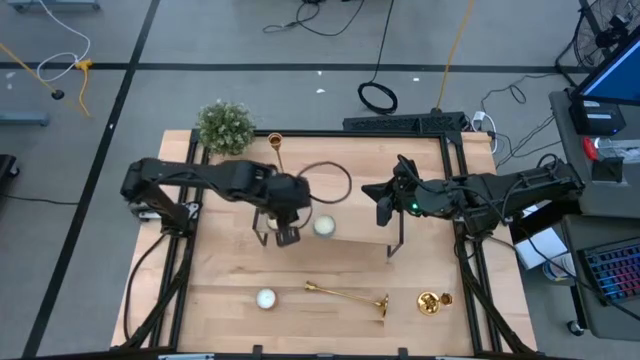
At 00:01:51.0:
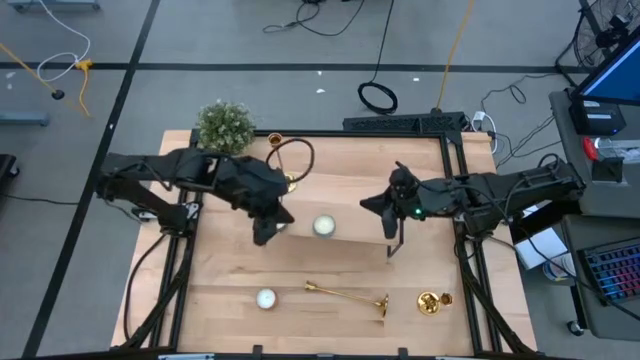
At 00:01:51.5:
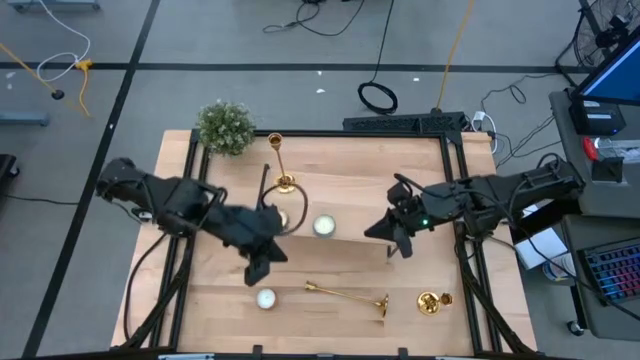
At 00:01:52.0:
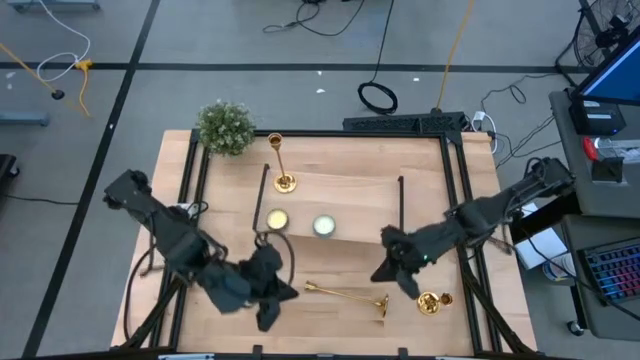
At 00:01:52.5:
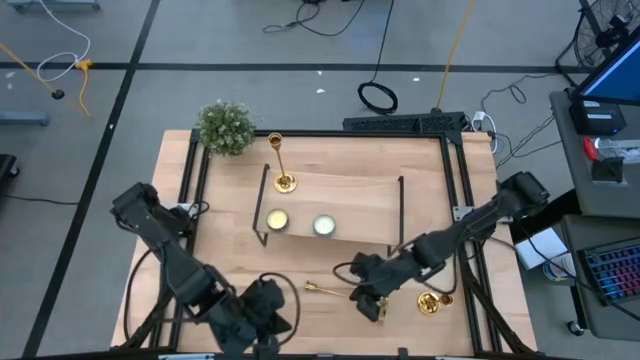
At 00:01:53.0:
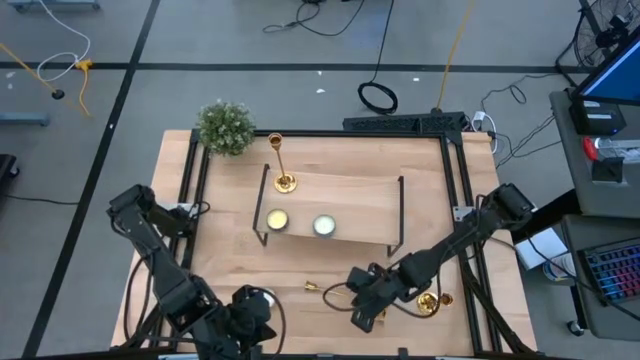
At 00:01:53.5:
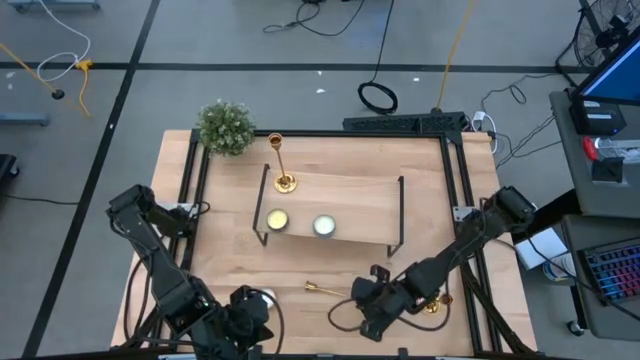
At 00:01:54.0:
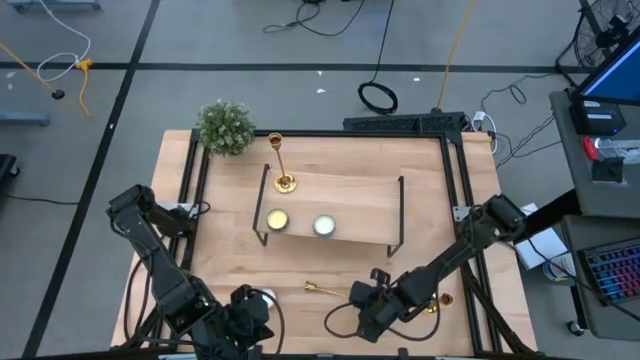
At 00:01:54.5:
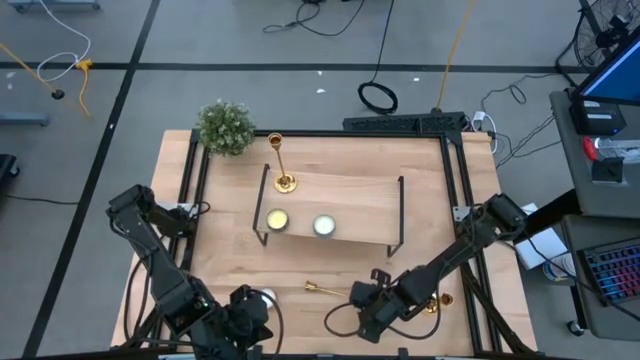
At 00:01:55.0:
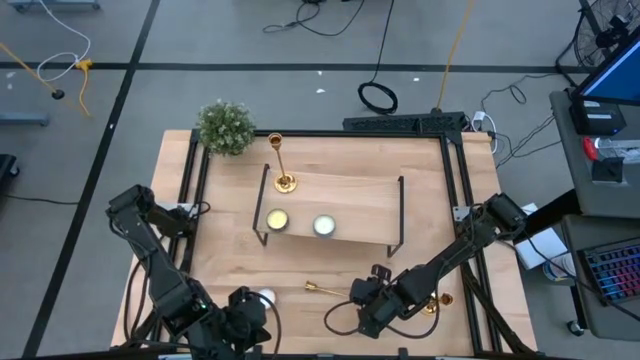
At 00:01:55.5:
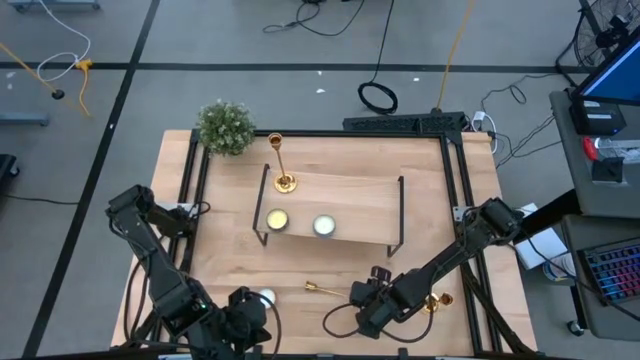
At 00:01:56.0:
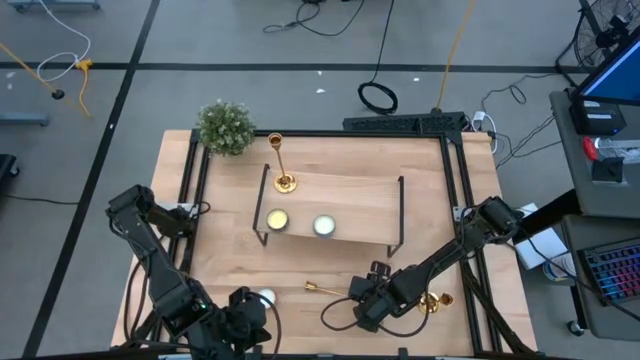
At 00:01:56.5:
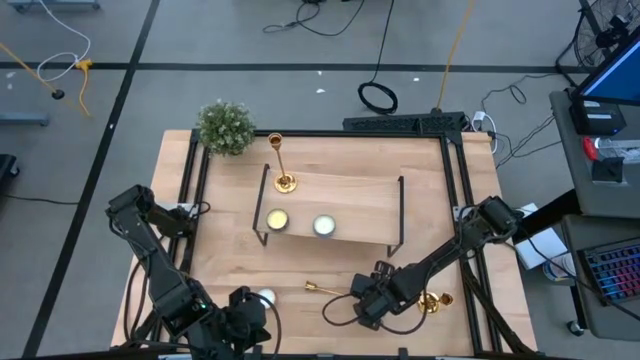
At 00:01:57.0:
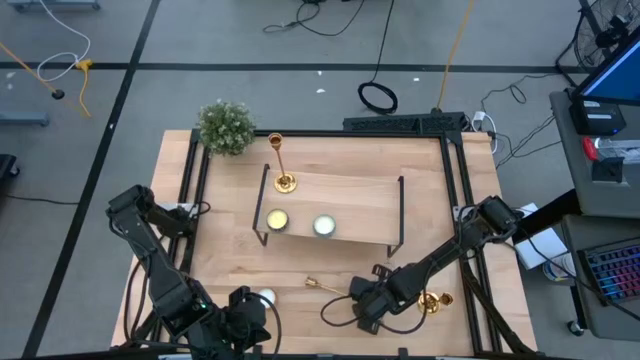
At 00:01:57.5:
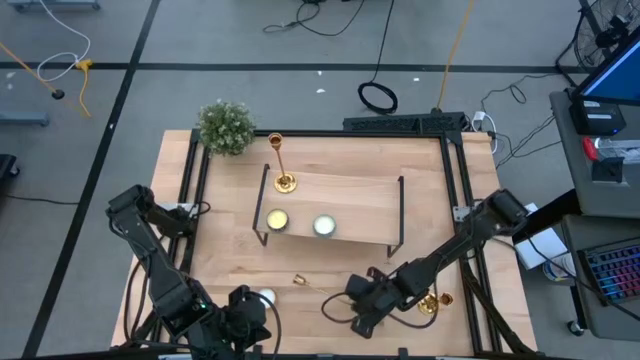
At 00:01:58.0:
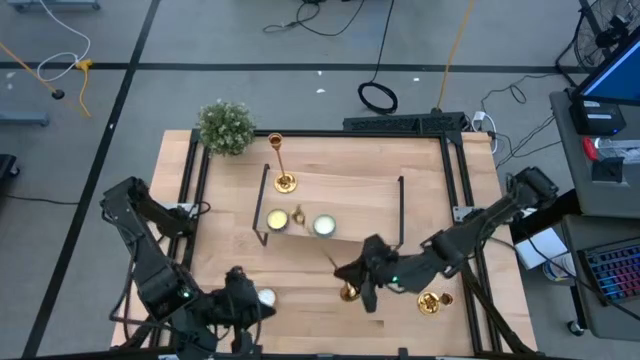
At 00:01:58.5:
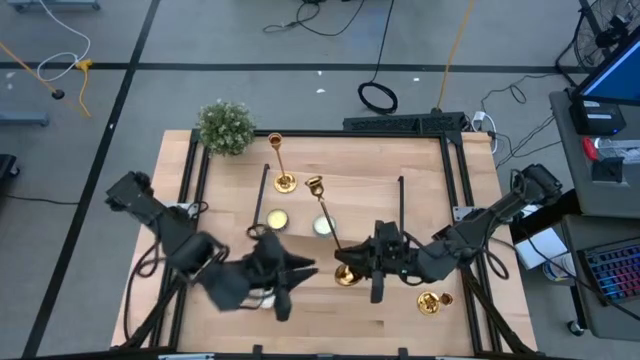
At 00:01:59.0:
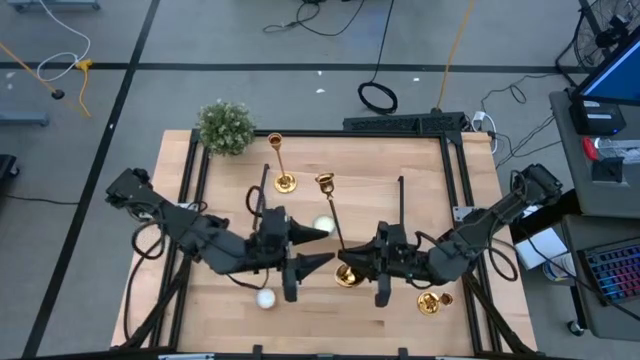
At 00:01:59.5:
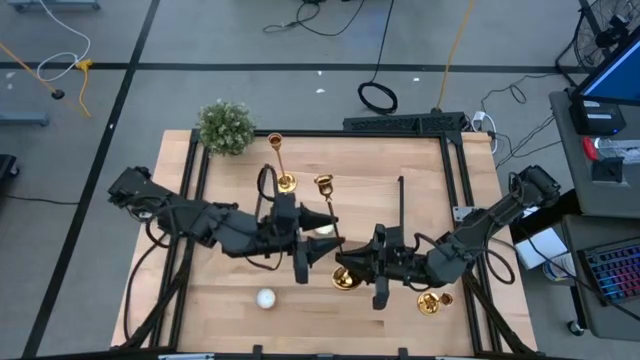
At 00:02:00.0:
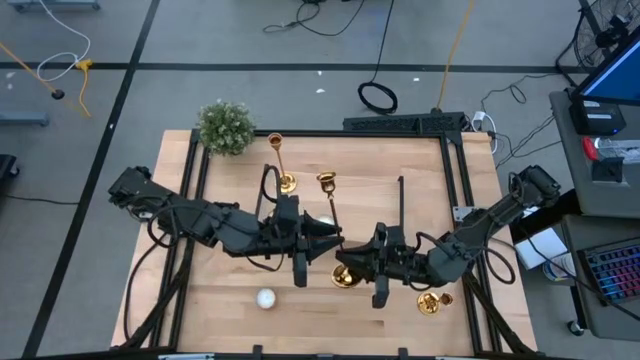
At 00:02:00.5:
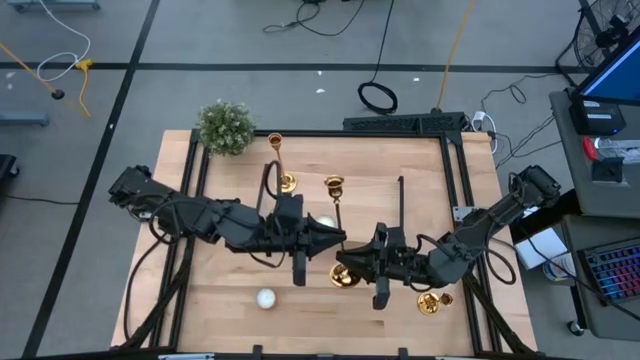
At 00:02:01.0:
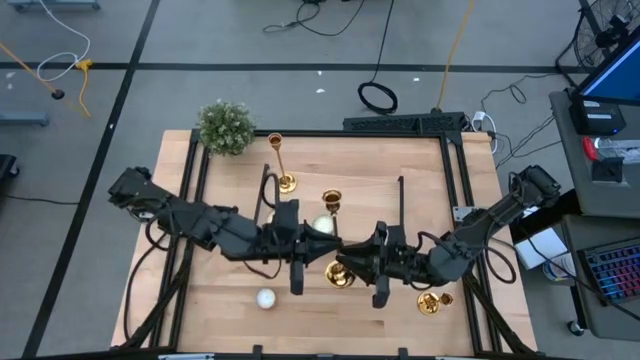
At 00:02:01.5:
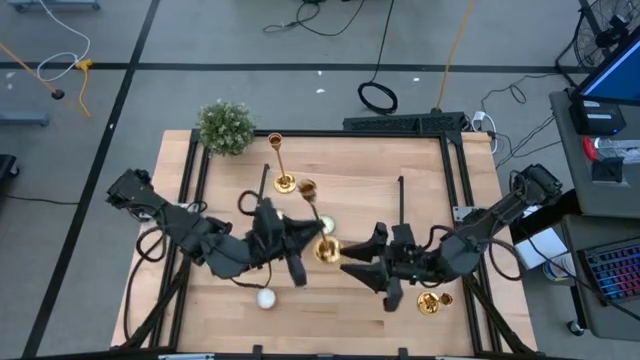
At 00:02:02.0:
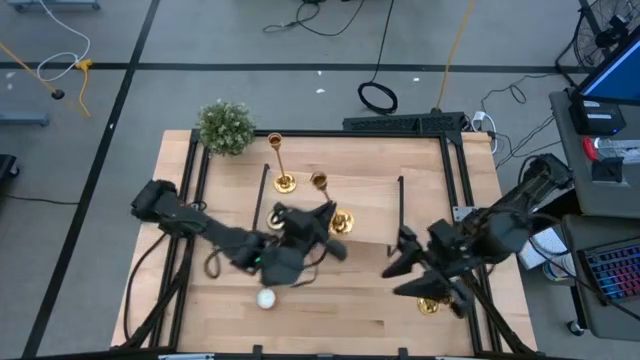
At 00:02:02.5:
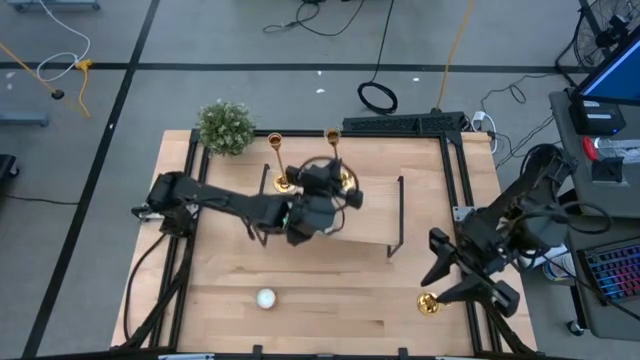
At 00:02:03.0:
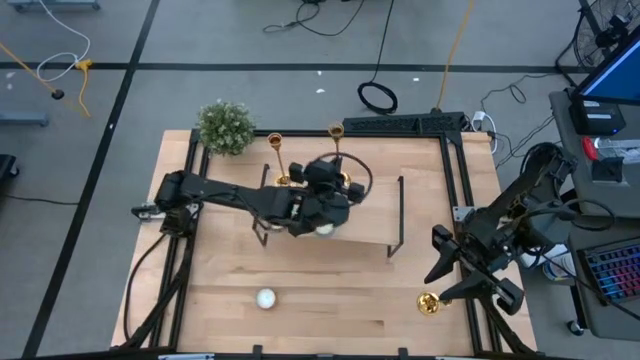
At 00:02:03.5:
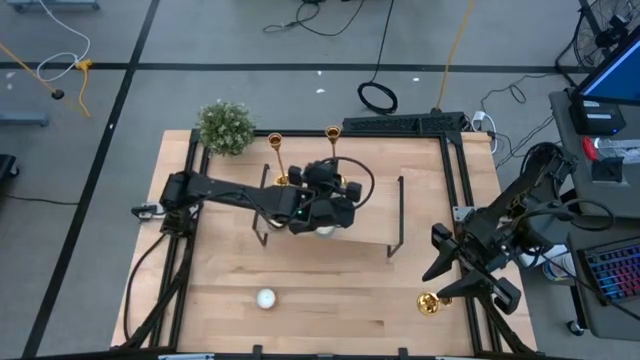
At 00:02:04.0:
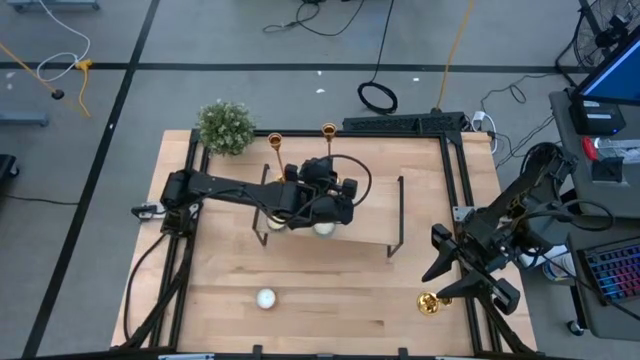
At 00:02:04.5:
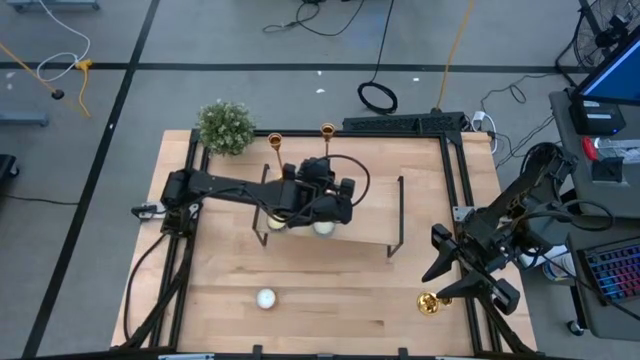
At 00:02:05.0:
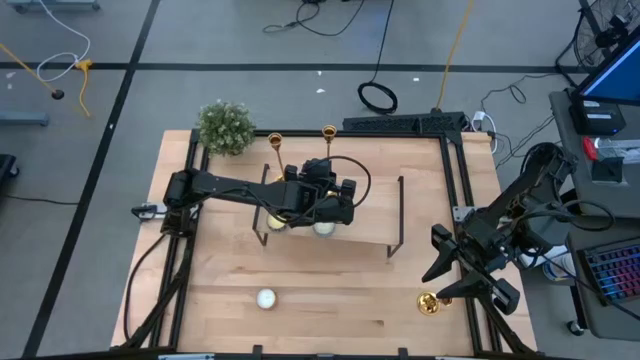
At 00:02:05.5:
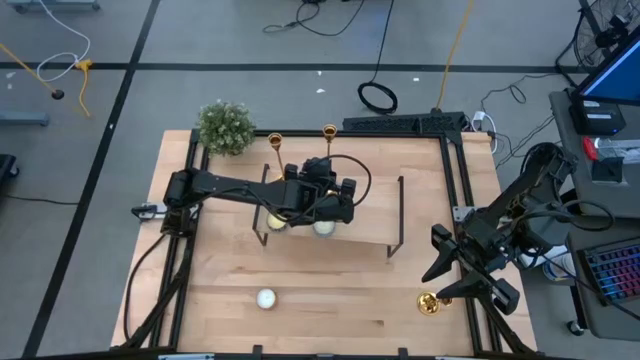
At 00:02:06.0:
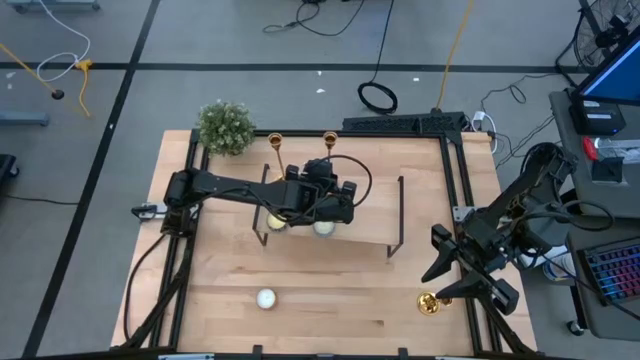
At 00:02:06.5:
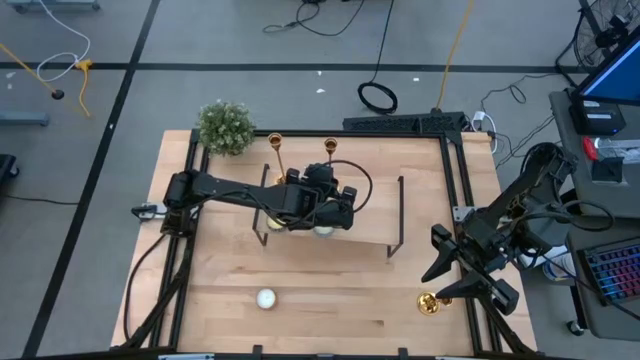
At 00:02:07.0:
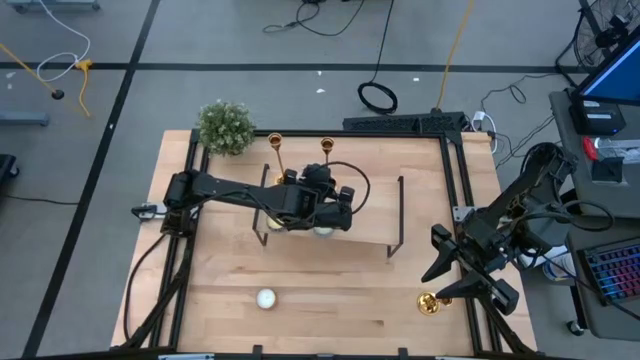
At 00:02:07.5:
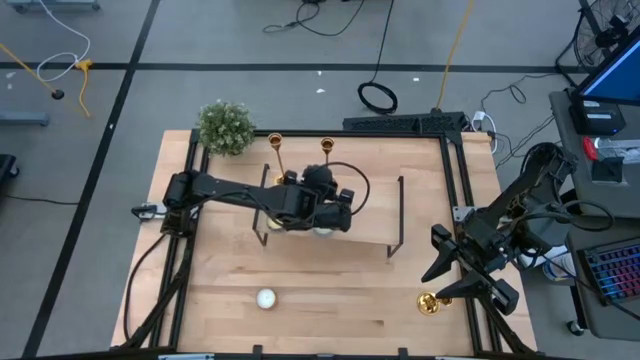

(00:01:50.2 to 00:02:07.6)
Task: Pick & Place candle stick holders
Put the left gold candle holder on the shelf
